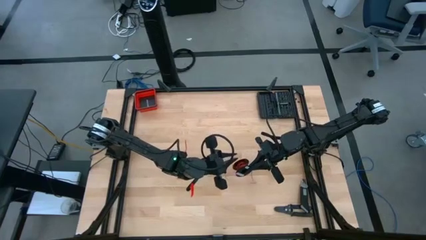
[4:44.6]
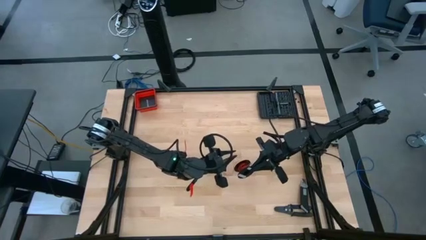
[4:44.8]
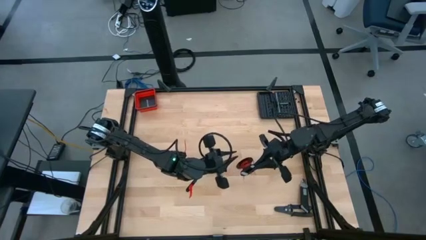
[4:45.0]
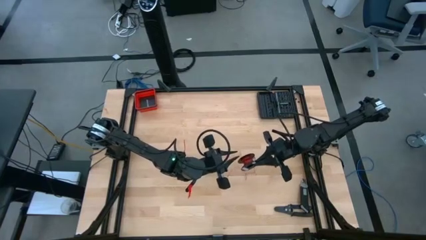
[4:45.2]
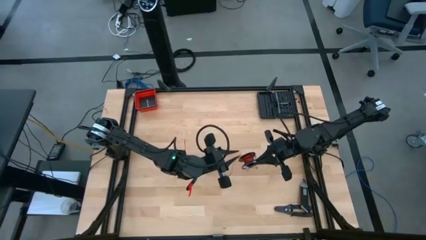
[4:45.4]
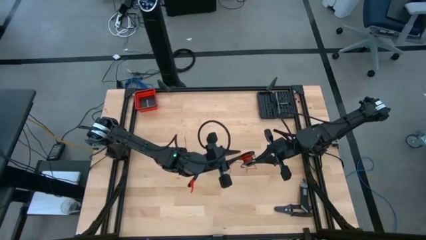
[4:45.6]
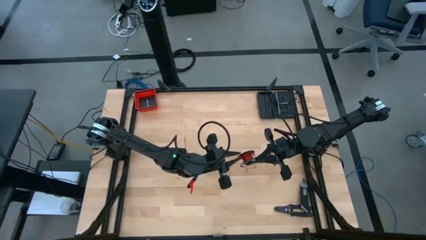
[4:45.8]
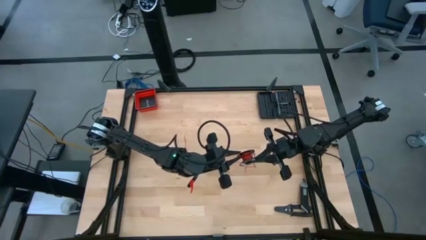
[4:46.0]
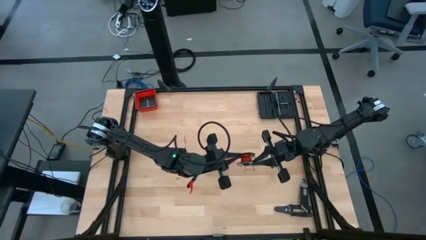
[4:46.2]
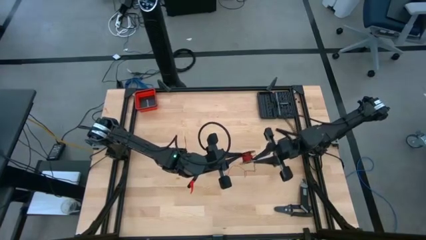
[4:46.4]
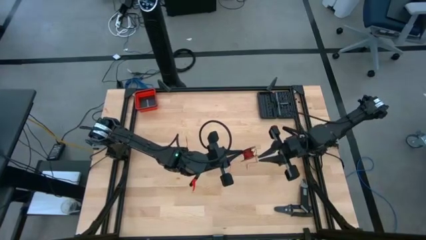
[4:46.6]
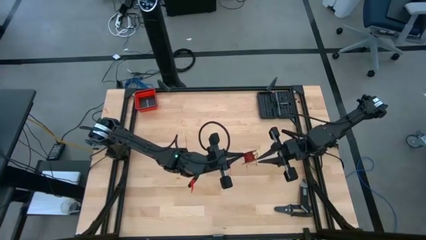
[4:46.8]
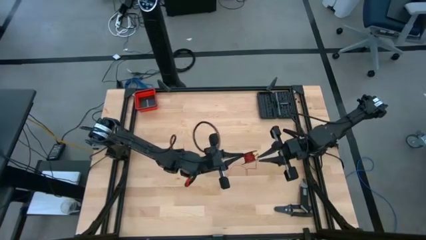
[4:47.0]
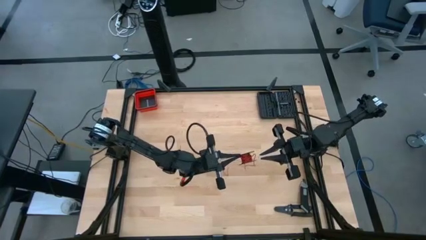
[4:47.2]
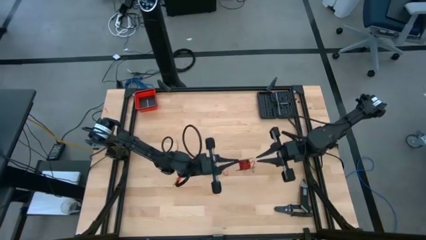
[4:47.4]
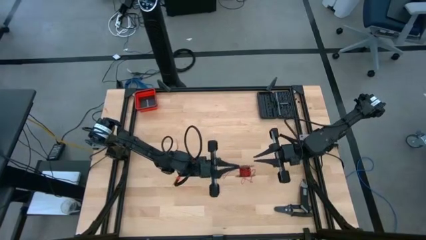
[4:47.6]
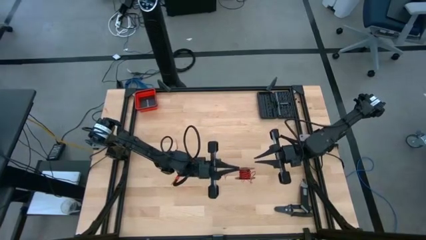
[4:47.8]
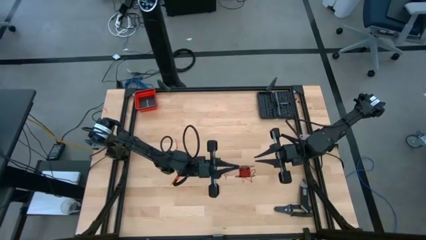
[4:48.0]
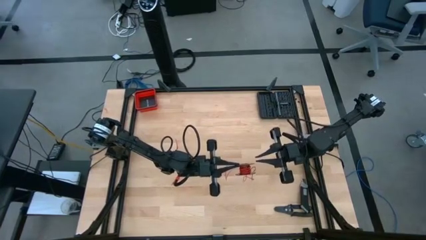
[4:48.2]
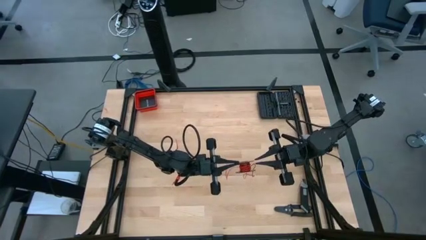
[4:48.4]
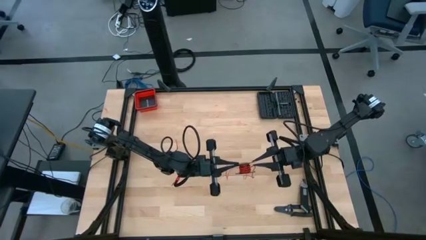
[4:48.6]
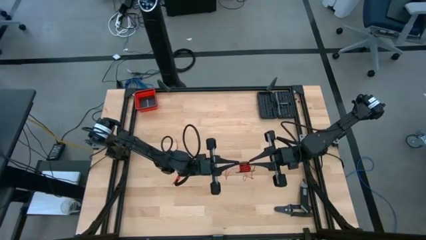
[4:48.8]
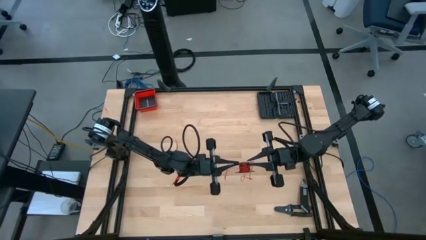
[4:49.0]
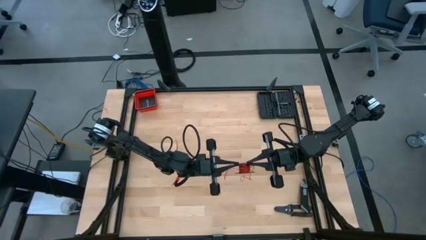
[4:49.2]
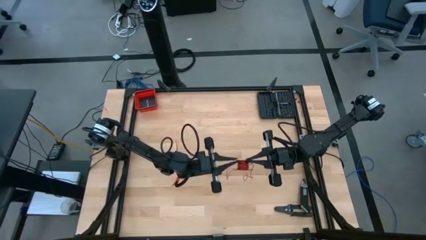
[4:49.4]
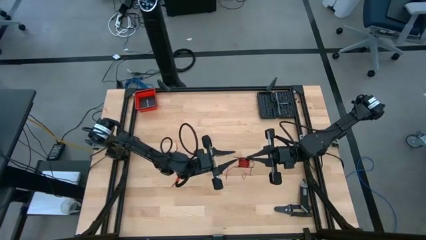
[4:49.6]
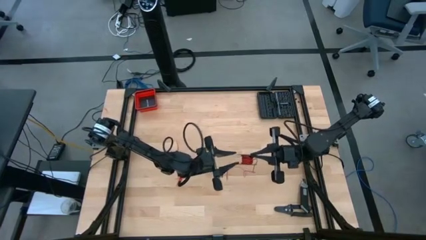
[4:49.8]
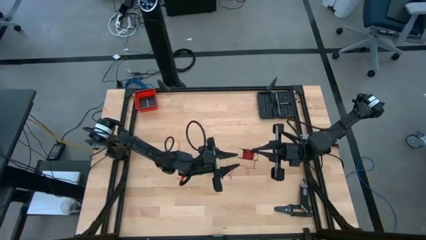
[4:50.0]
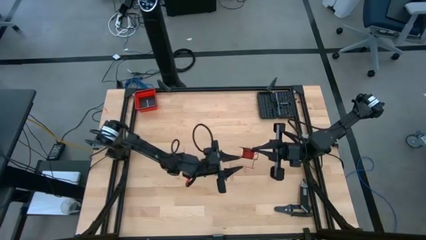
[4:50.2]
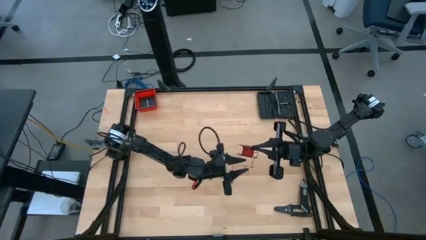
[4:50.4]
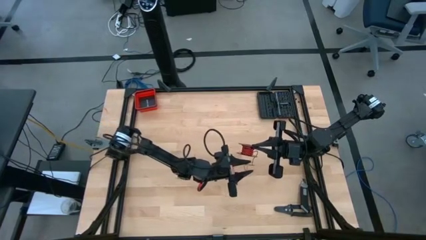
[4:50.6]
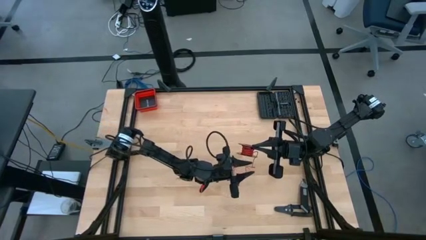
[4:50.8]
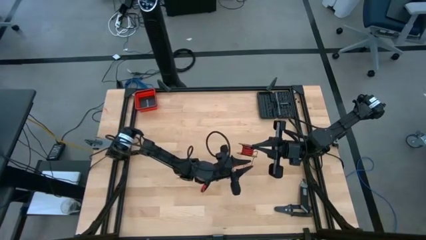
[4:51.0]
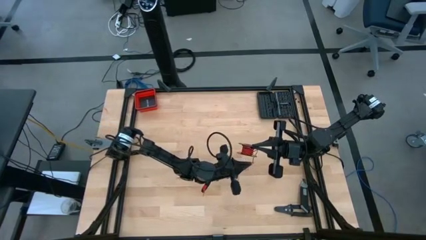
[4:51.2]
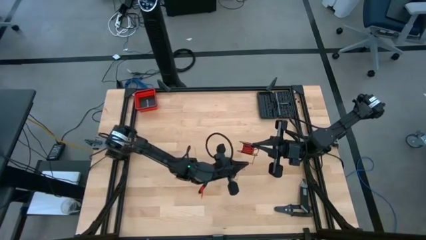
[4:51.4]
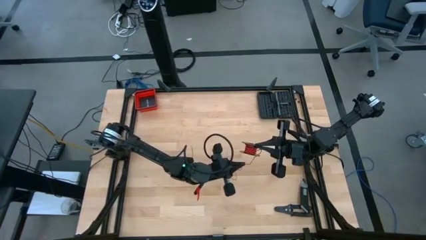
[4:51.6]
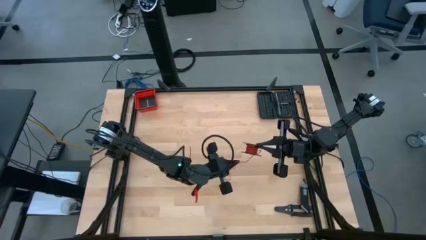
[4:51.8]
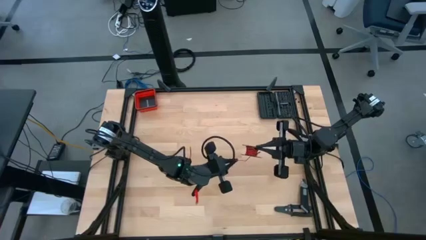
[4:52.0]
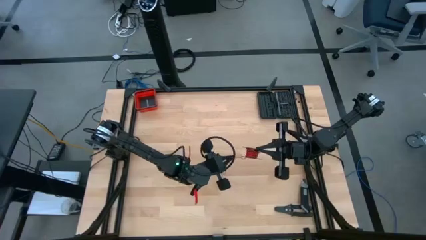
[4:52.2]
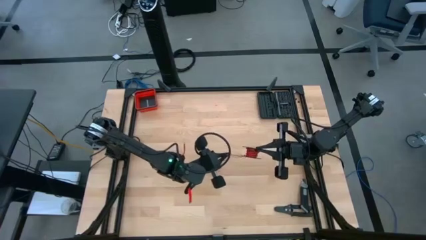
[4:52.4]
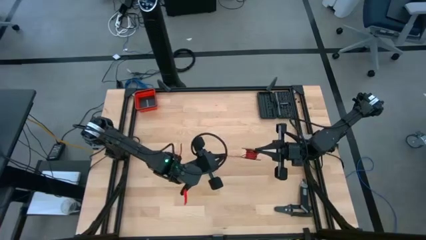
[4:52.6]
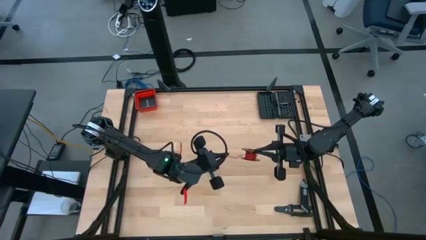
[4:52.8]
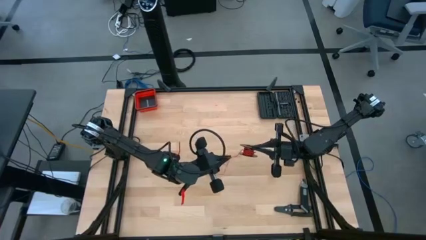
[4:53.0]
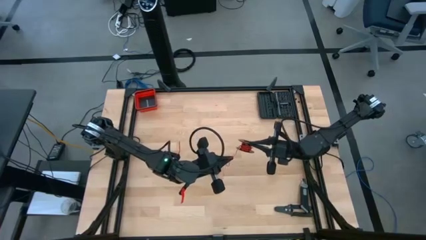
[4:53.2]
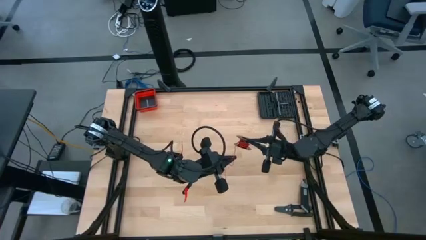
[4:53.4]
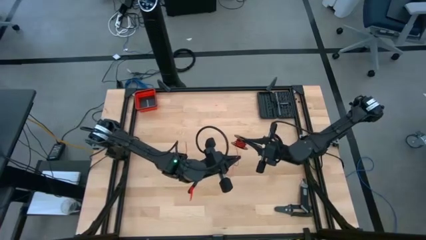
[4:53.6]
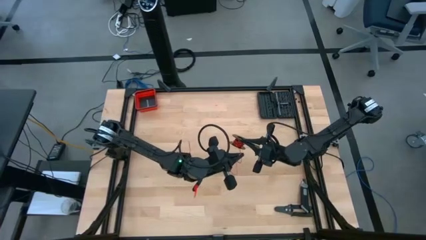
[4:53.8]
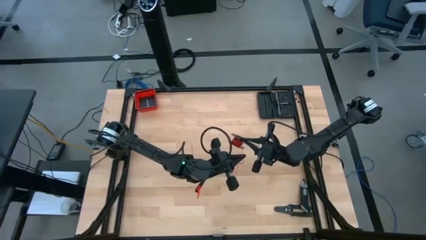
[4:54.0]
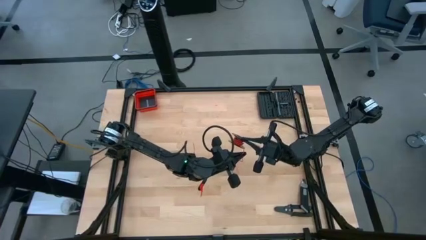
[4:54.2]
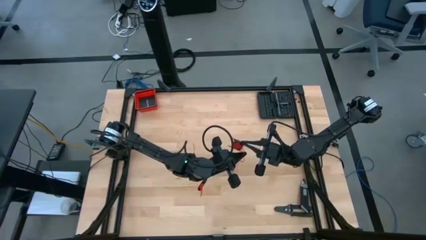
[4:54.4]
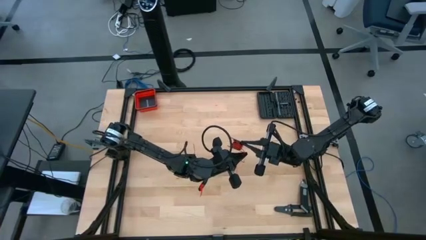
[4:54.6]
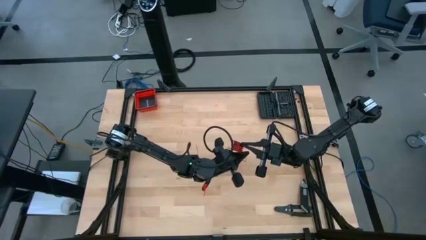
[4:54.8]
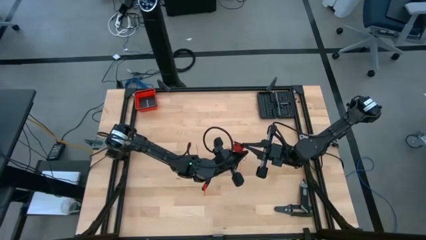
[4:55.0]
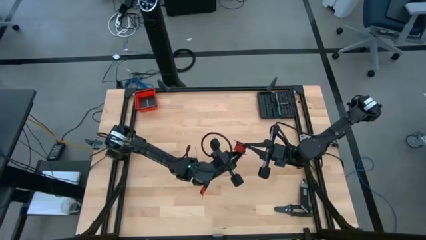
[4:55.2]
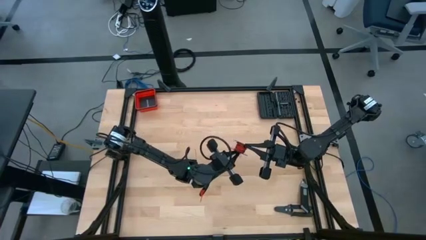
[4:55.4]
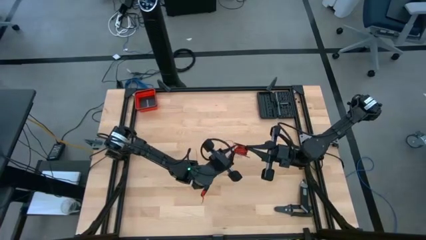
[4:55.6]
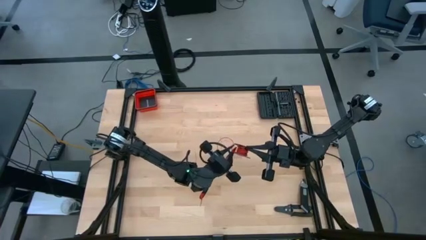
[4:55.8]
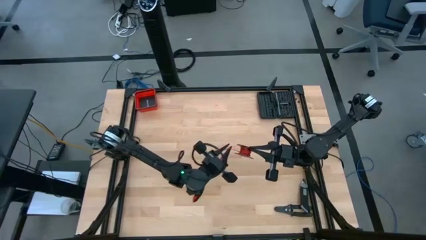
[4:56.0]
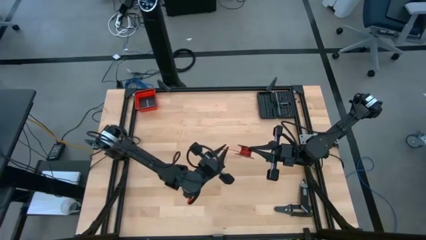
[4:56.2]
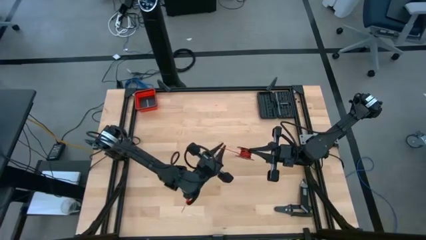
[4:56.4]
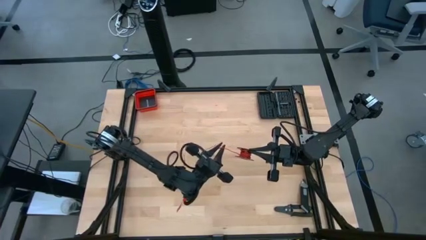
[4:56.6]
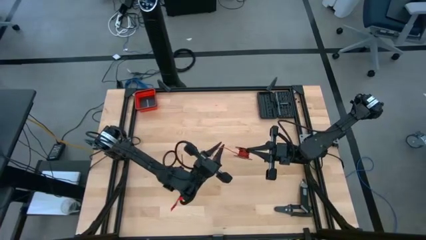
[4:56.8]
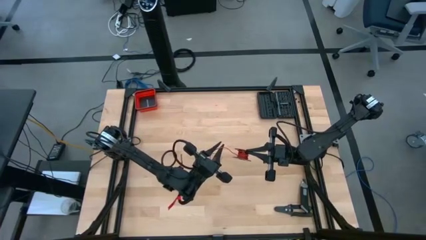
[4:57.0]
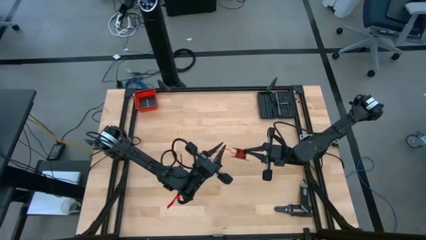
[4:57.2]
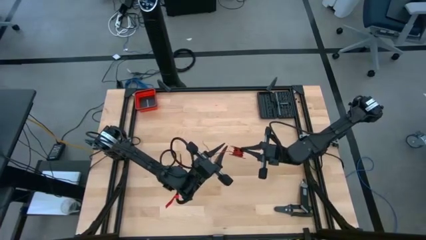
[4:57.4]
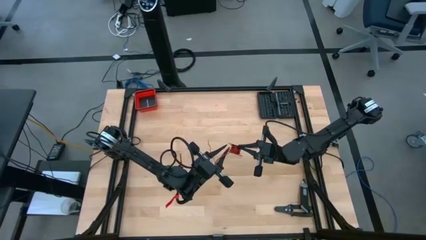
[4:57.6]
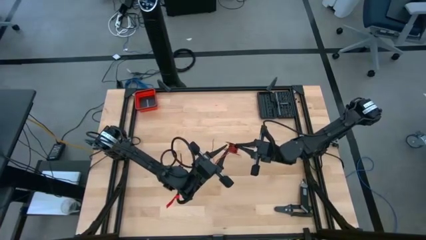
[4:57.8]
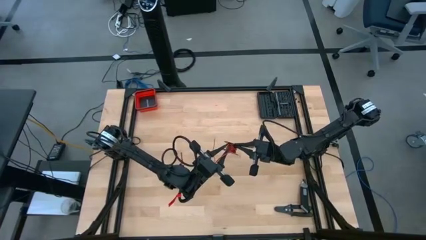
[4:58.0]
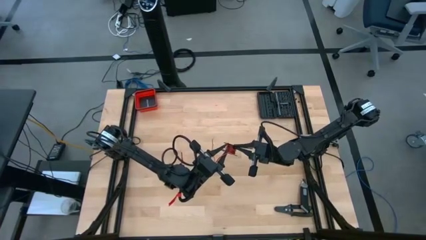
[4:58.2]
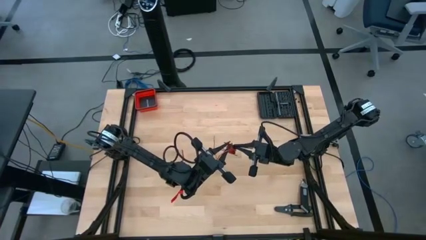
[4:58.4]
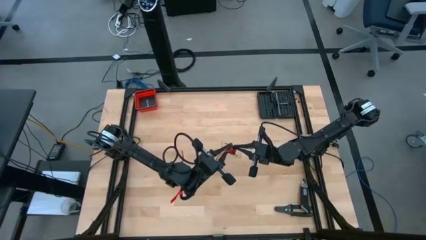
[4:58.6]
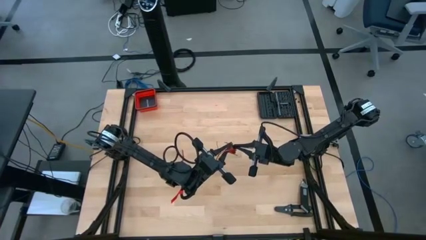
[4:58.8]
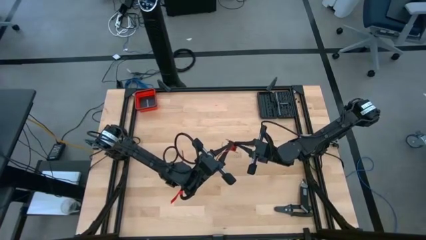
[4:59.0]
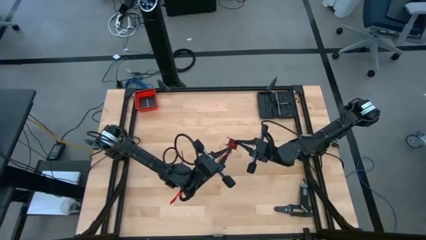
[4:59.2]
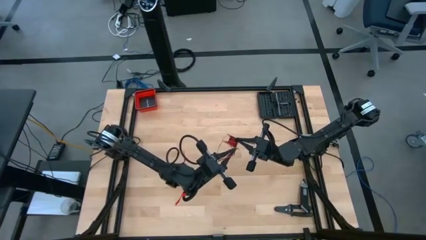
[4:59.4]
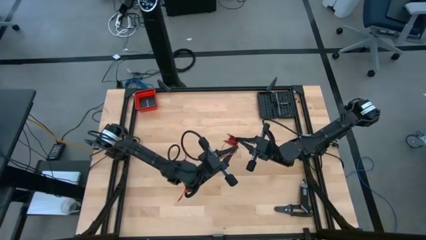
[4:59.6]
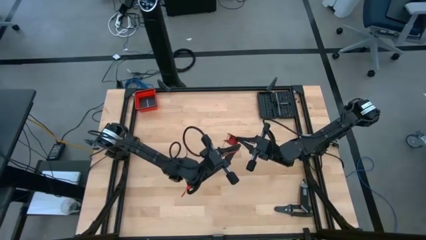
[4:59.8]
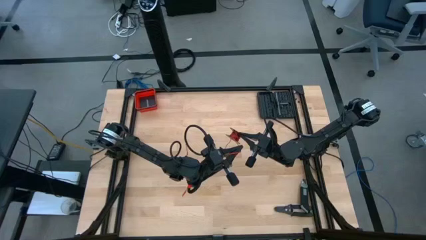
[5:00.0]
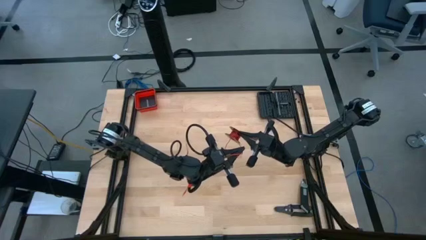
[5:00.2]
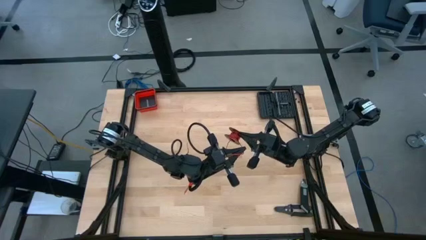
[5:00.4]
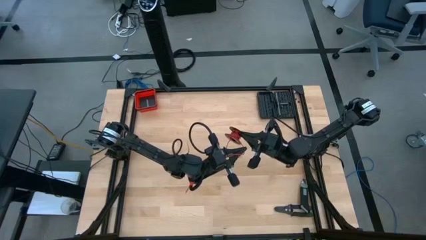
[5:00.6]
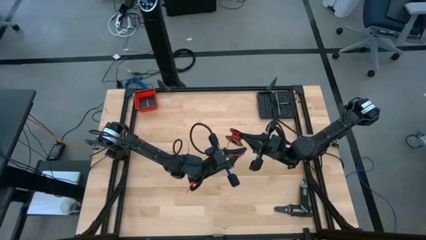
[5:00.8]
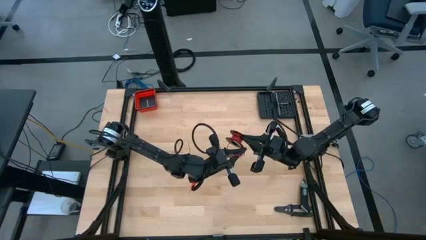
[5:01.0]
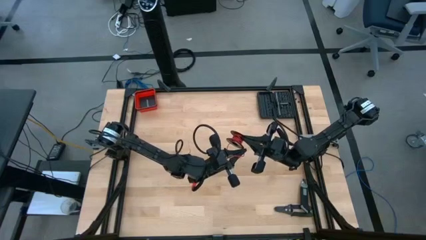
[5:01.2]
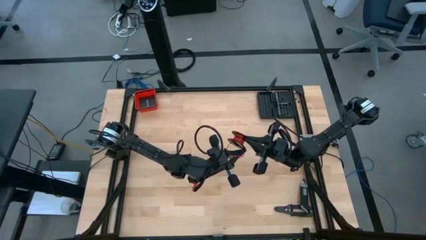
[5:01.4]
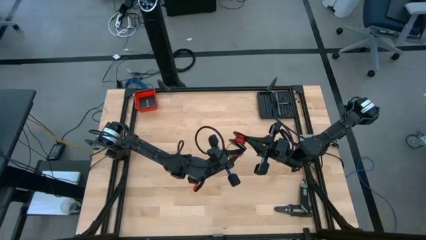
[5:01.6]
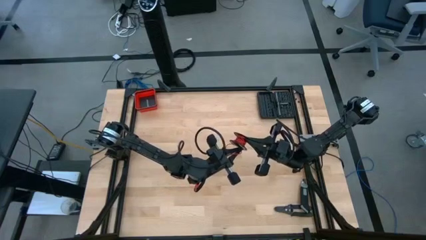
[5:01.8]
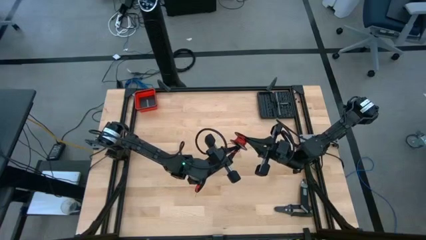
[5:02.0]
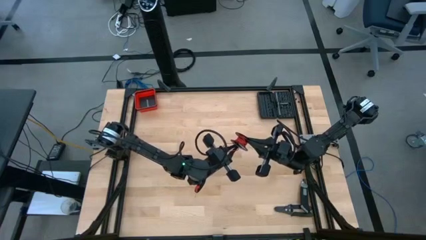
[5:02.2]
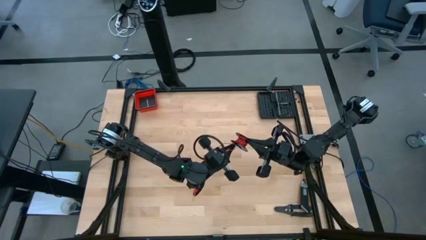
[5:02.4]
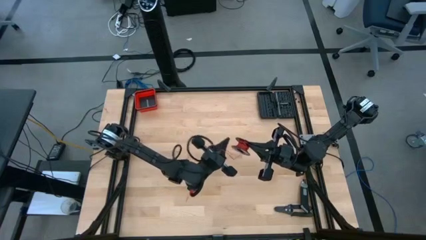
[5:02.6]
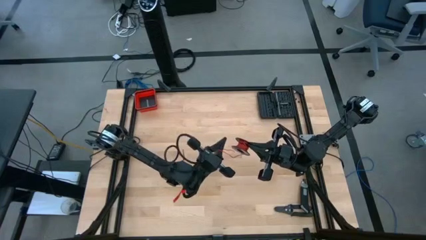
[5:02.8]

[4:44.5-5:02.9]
Task: Coil cords
Coil the red wire onto the spool
